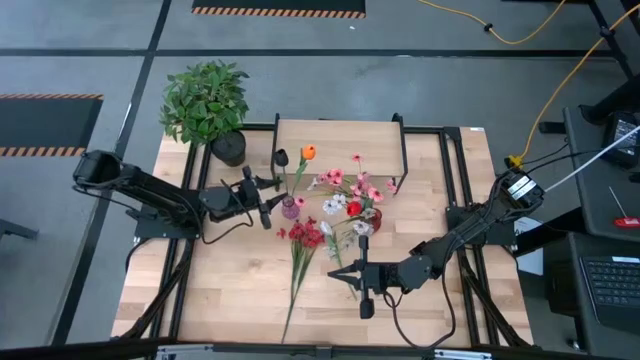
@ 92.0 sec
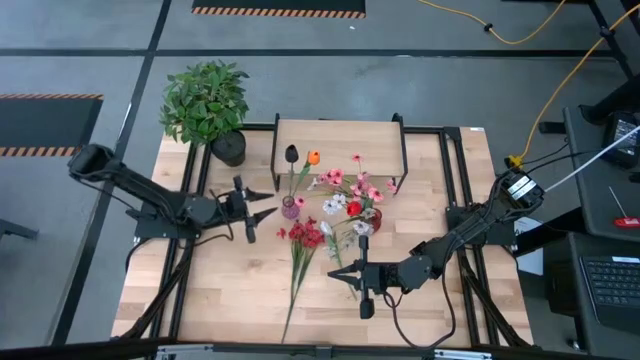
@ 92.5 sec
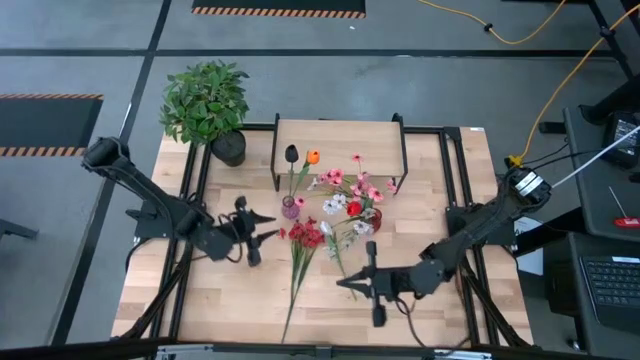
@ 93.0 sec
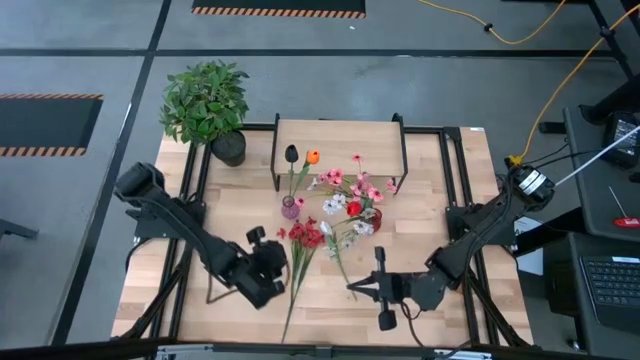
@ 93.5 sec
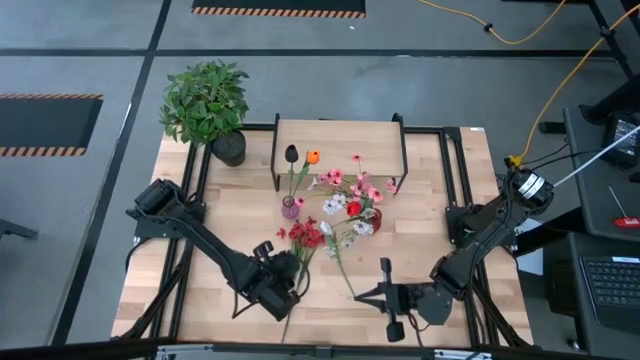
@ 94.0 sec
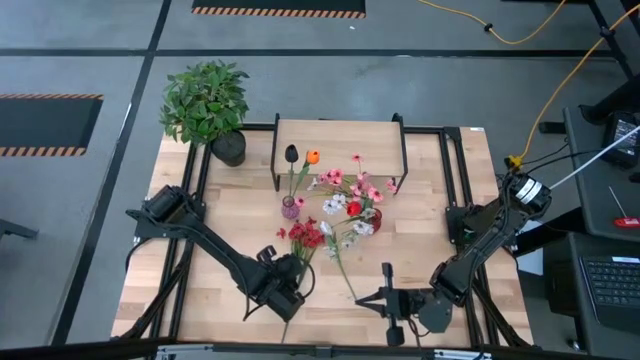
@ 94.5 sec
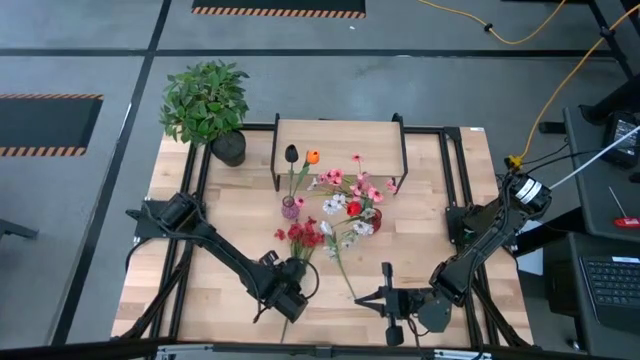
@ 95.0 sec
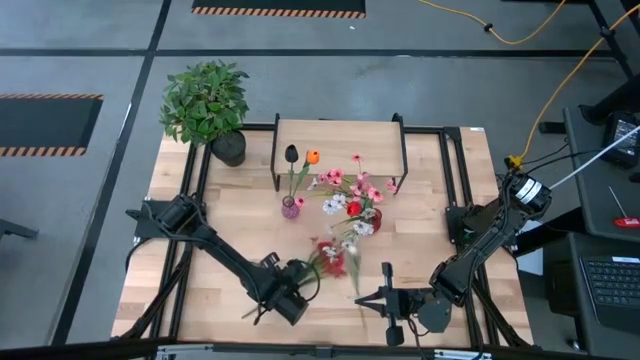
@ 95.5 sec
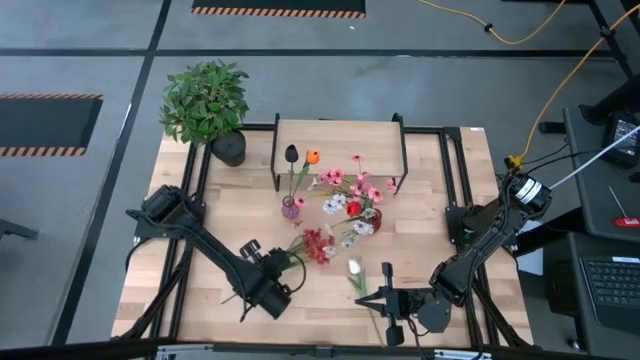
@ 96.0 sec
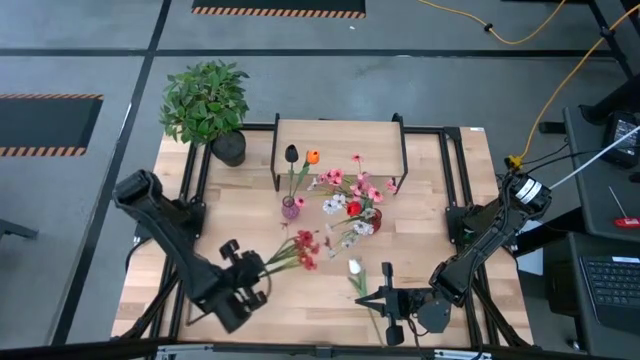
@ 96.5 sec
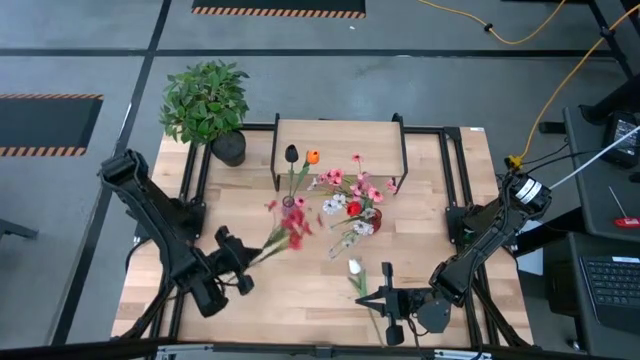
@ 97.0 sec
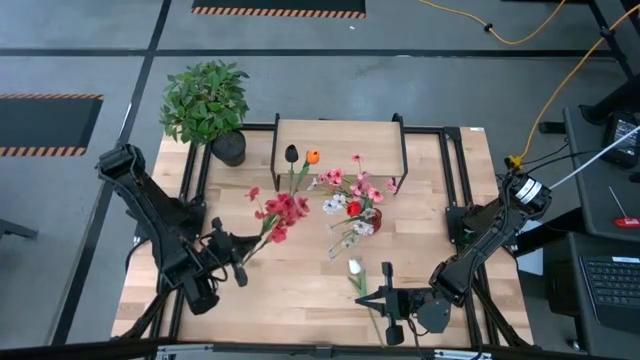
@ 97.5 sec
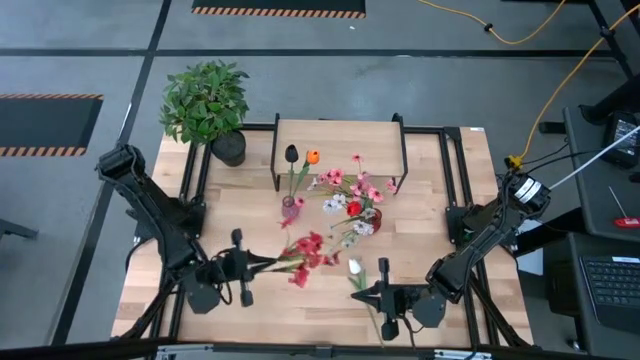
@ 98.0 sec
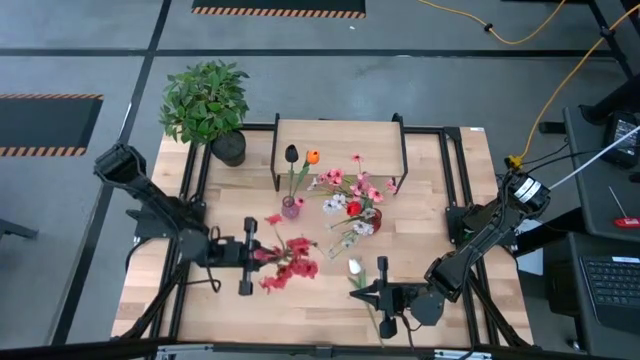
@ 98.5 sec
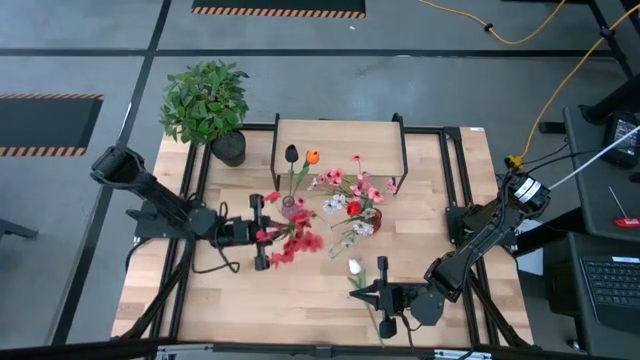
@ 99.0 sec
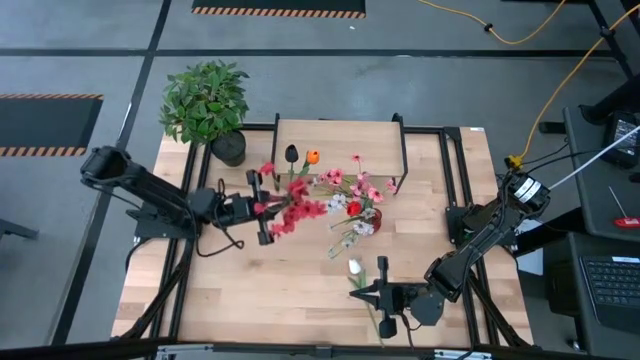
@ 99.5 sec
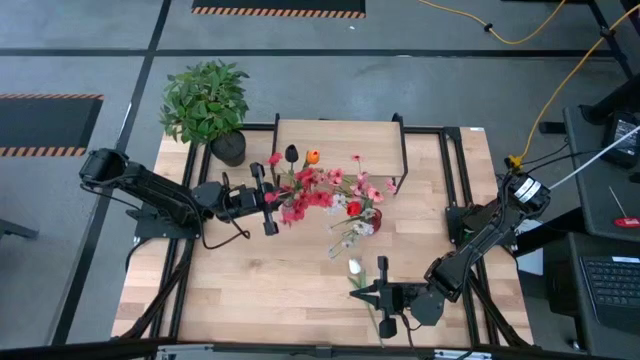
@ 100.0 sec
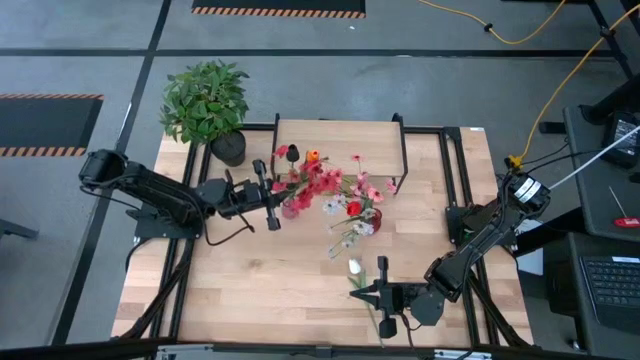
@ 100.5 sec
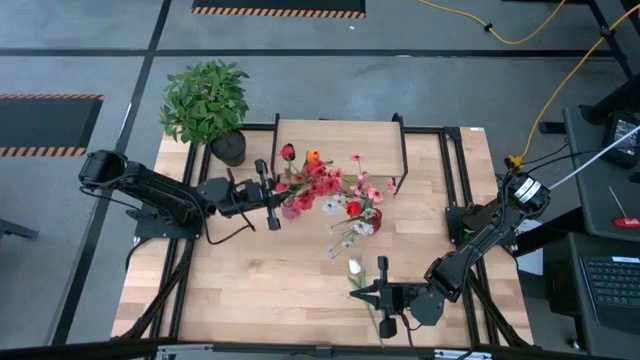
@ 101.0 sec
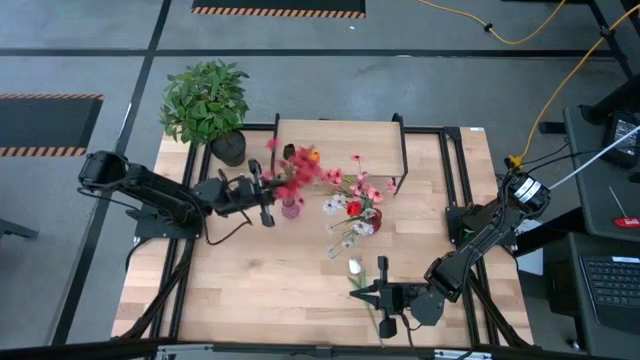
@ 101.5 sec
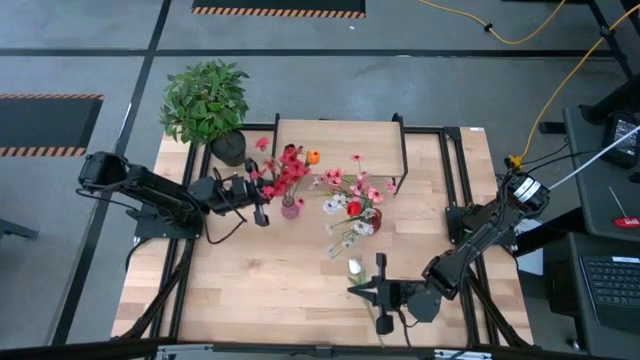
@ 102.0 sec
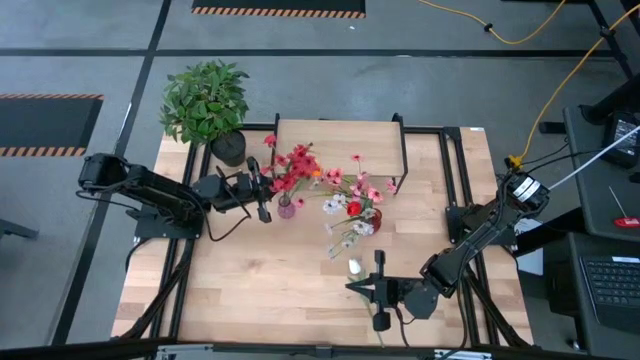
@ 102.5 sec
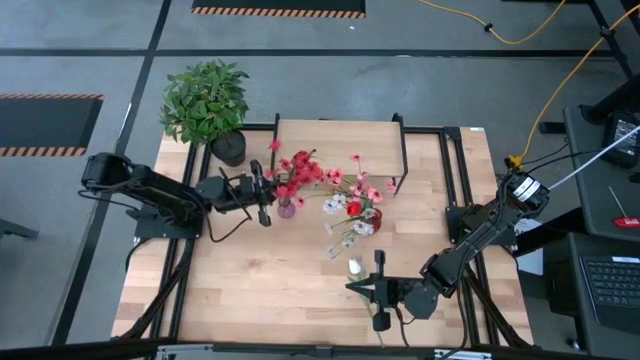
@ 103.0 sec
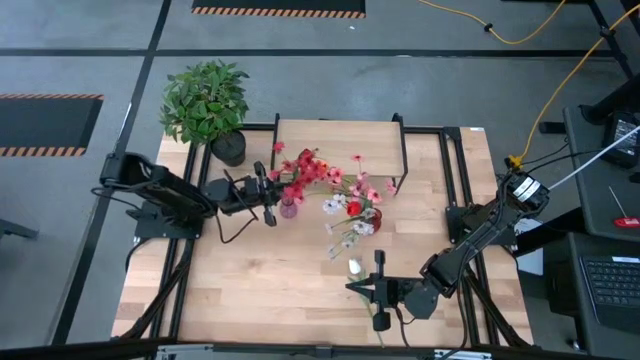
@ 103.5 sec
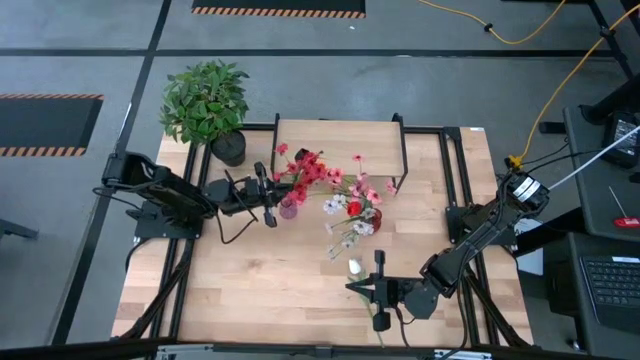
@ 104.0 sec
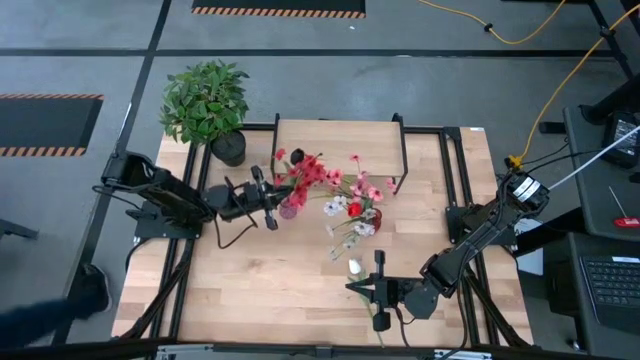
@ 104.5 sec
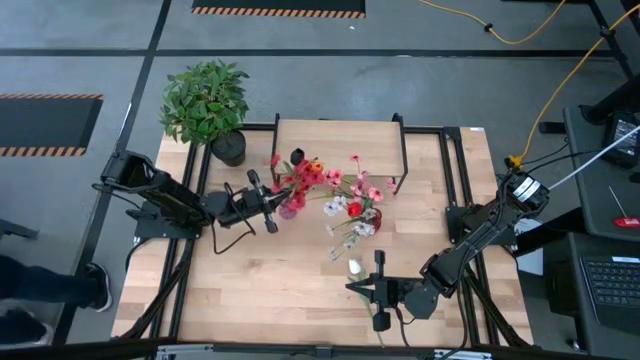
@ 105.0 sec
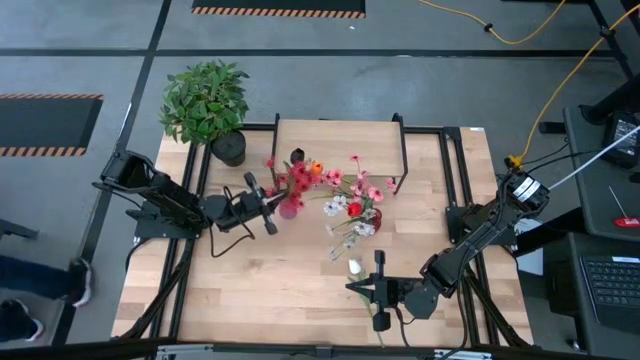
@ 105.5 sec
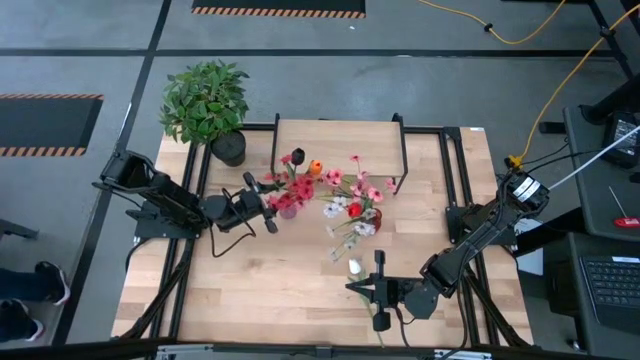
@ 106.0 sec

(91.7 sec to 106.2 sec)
Task: Pick and place flowers into a vace then onto a shelf
Put the red flowers into the purple vase

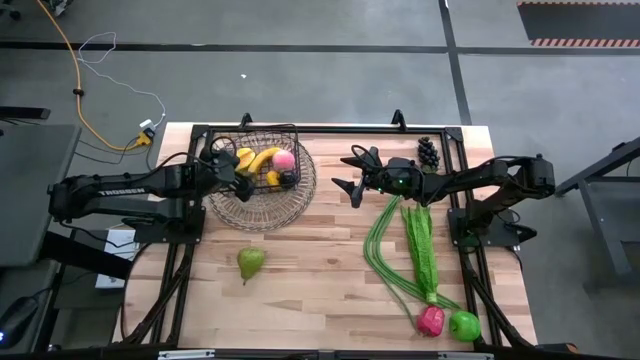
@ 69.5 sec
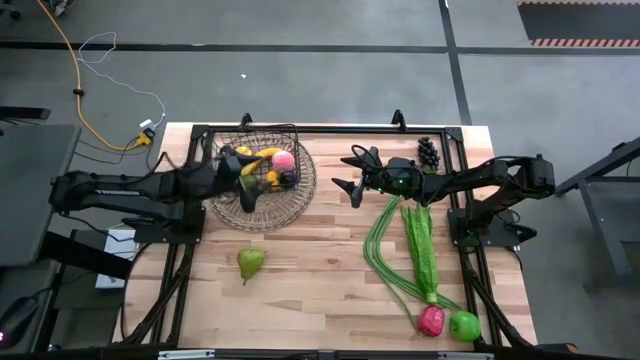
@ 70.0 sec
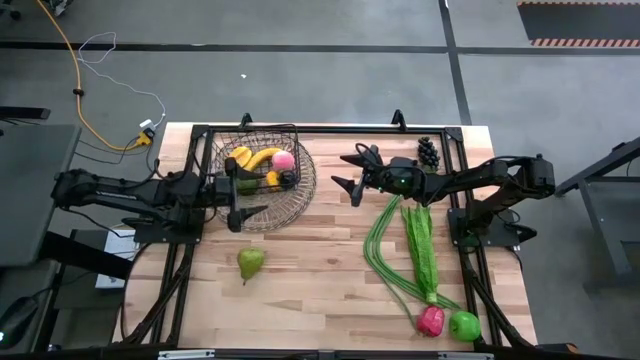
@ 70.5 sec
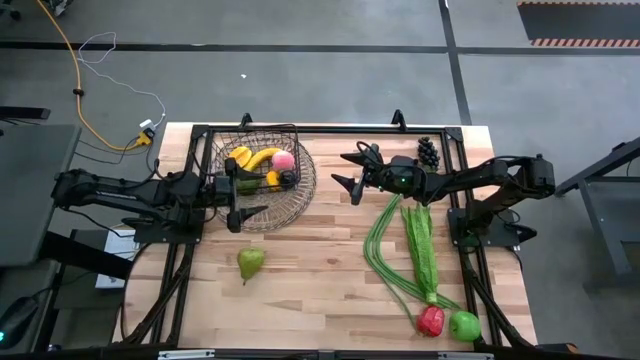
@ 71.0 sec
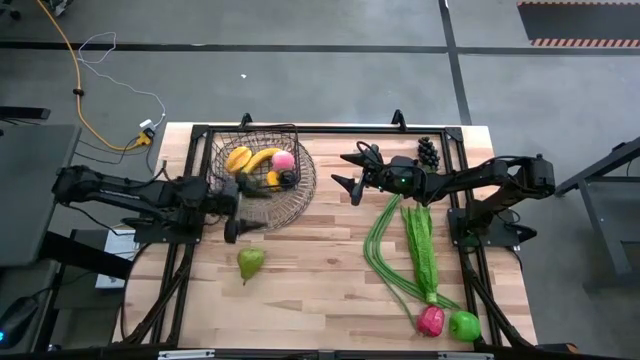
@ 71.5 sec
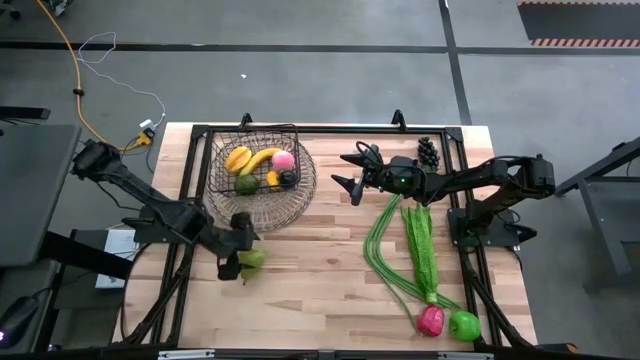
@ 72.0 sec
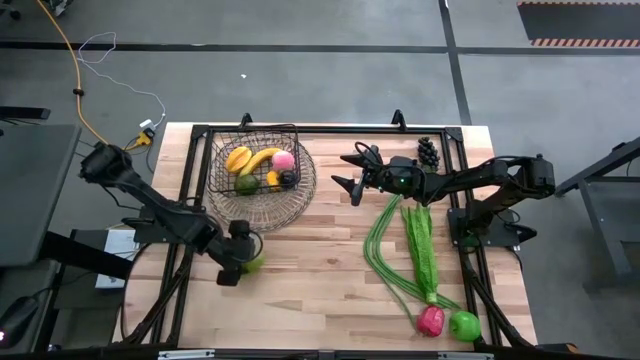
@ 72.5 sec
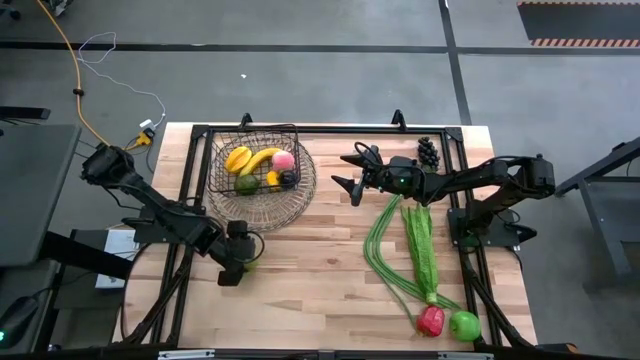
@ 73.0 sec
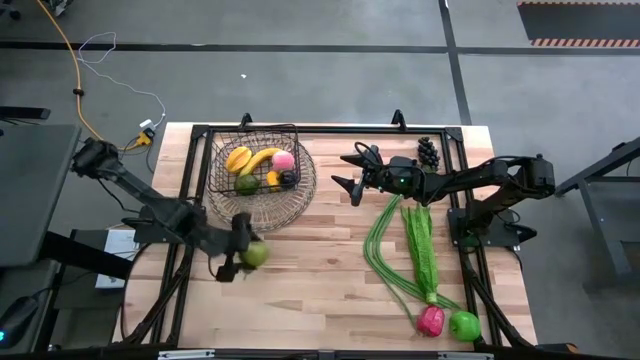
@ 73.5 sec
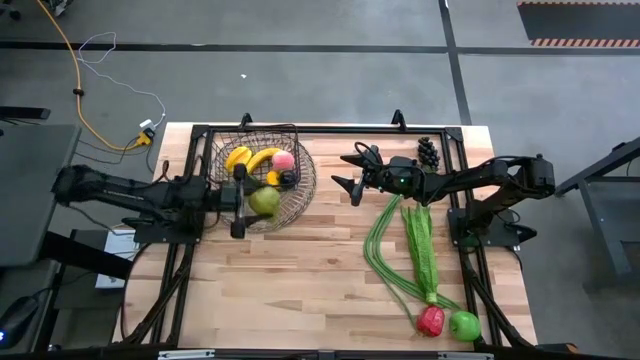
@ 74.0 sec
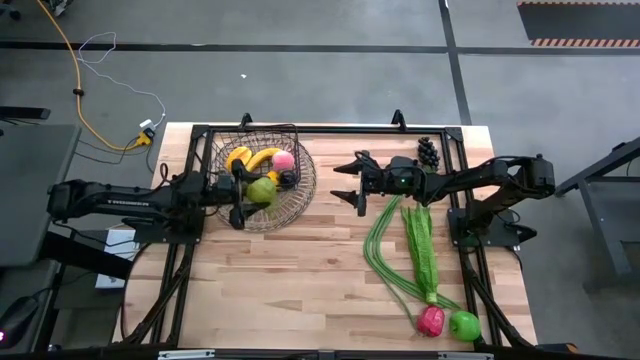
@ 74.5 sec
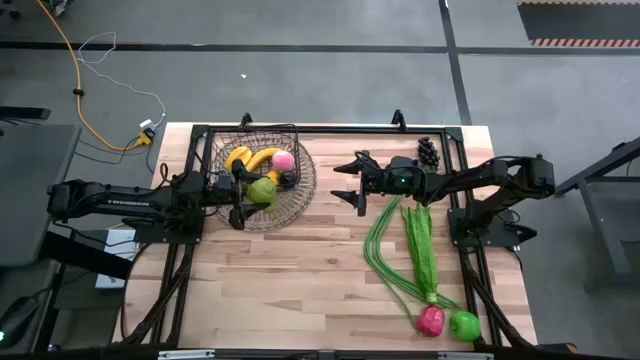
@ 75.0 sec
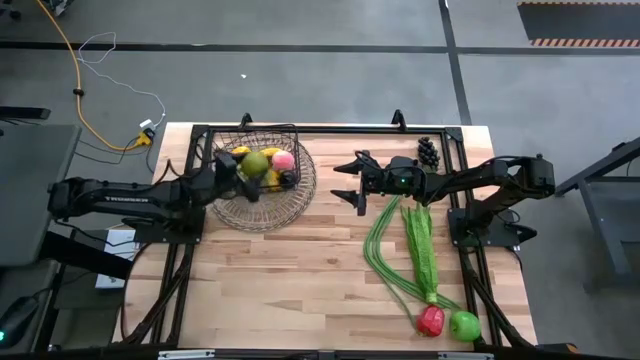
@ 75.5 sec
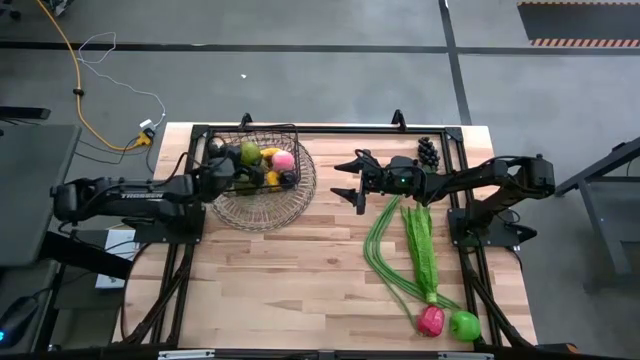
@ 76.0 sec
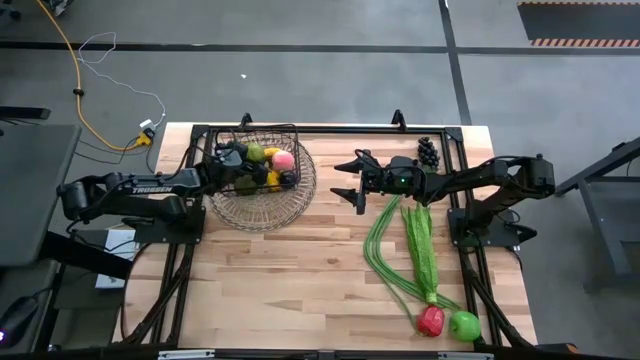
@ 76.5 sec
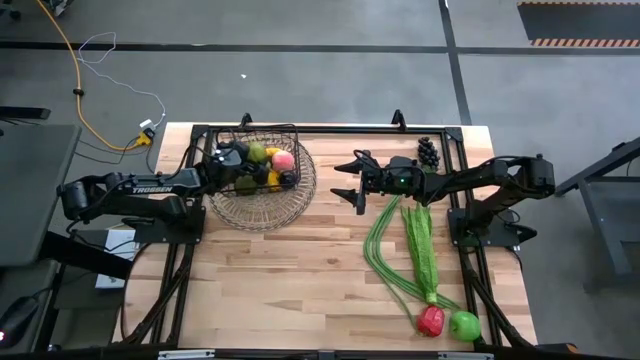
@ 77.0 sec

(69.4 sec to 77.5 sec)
Task: Build produce basket
Put the green pear into the wire basket
